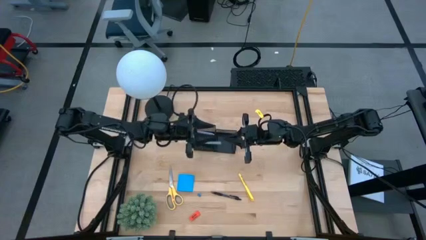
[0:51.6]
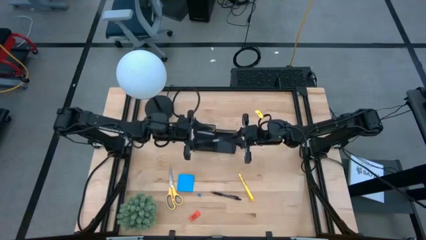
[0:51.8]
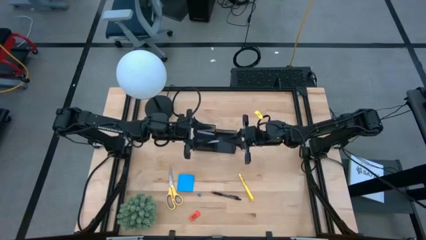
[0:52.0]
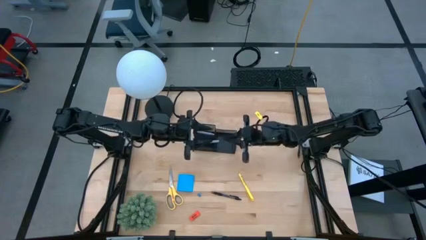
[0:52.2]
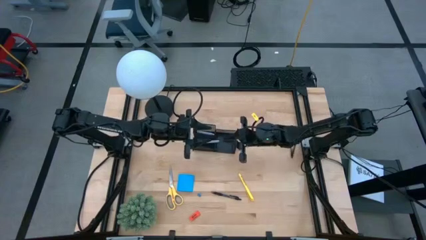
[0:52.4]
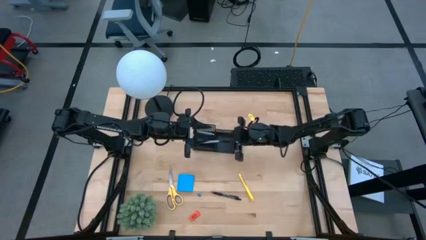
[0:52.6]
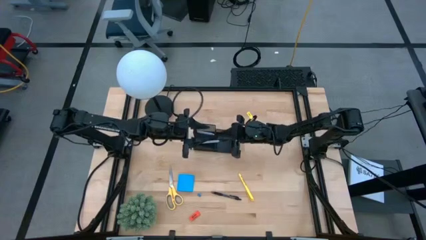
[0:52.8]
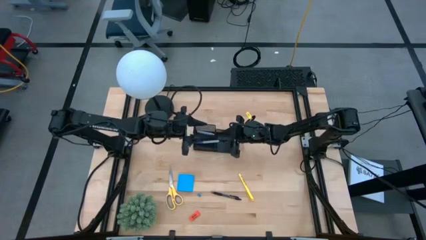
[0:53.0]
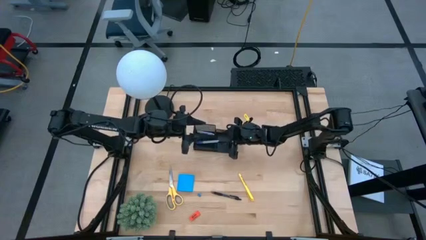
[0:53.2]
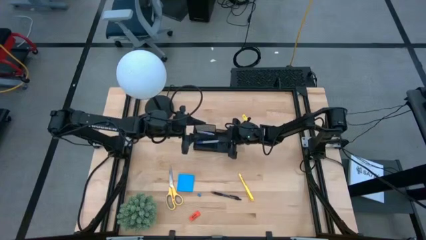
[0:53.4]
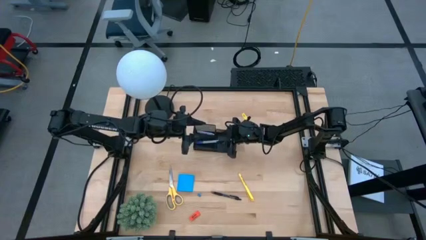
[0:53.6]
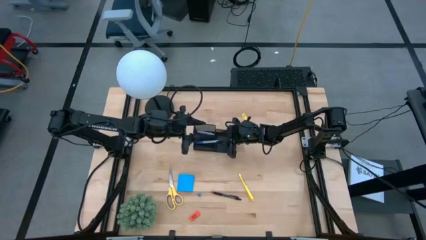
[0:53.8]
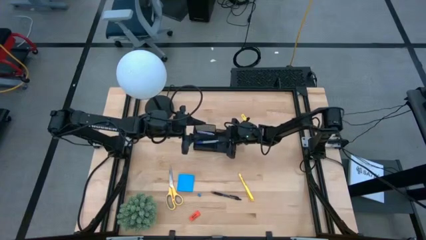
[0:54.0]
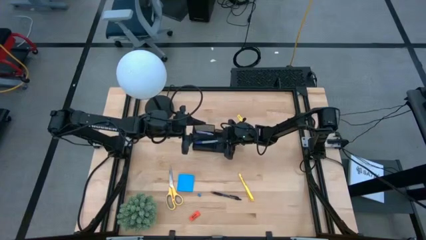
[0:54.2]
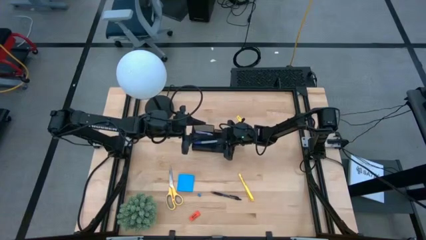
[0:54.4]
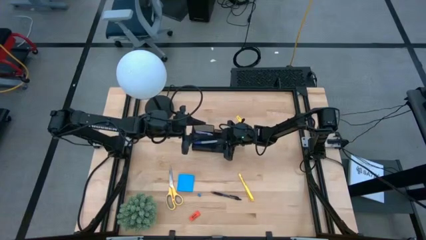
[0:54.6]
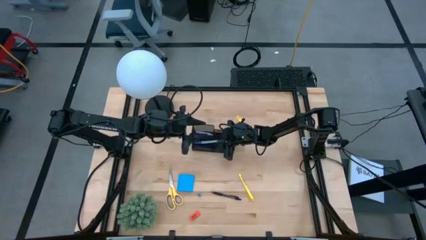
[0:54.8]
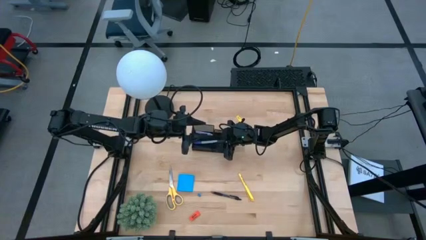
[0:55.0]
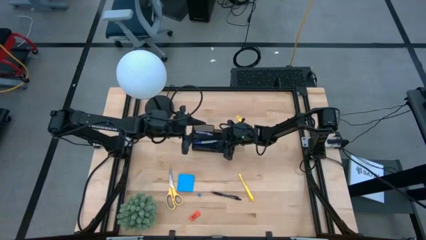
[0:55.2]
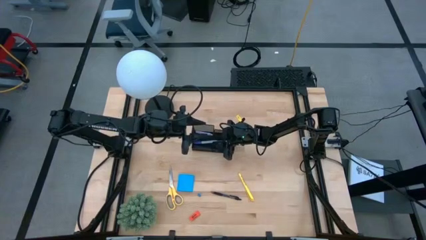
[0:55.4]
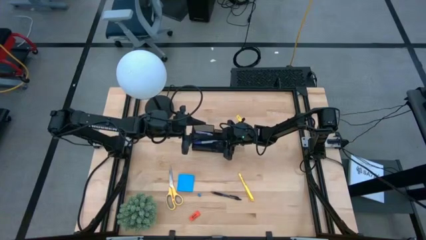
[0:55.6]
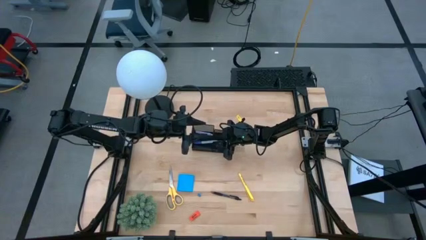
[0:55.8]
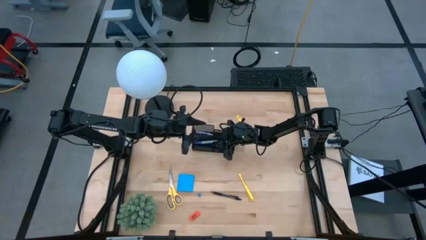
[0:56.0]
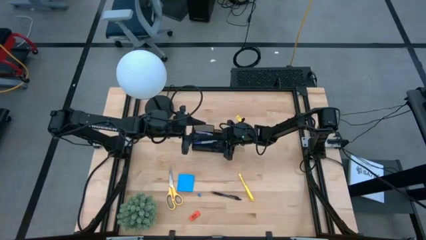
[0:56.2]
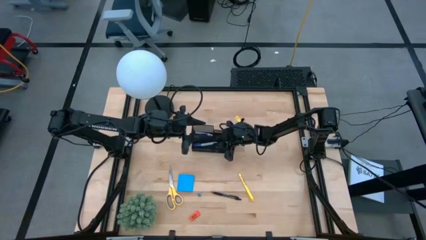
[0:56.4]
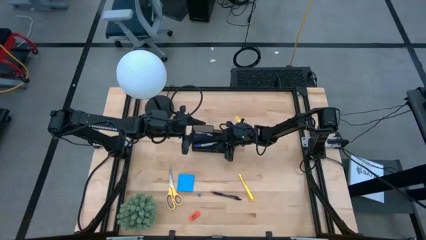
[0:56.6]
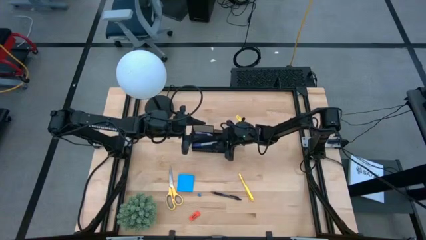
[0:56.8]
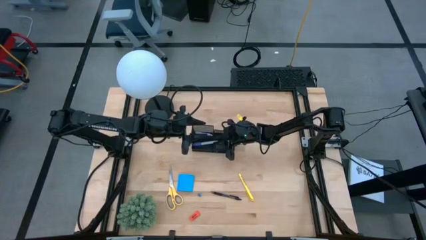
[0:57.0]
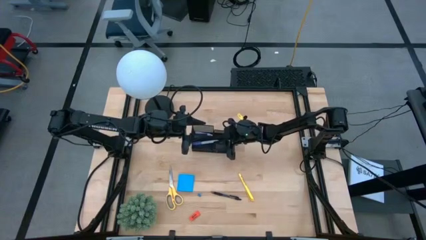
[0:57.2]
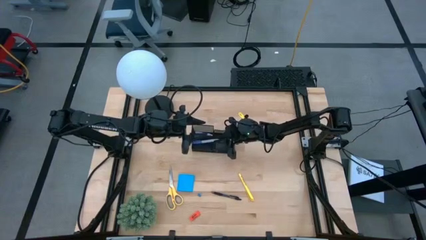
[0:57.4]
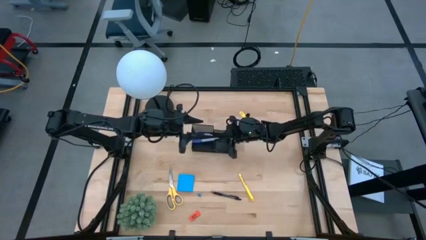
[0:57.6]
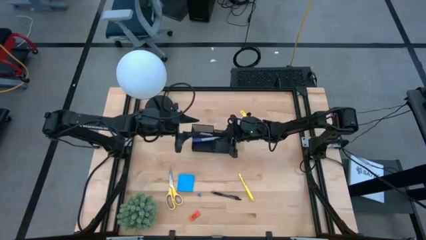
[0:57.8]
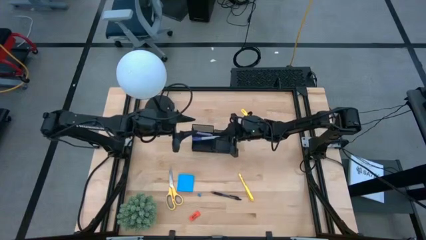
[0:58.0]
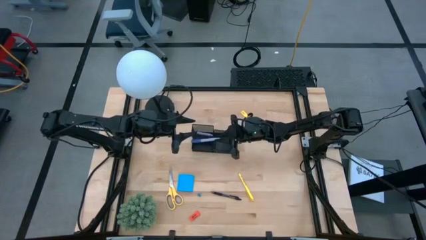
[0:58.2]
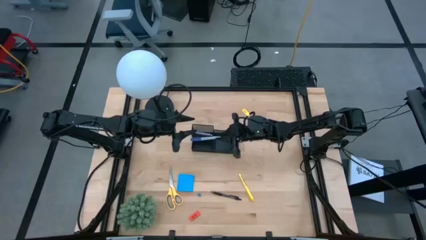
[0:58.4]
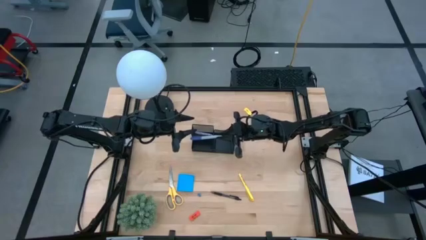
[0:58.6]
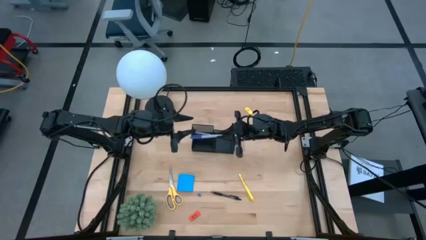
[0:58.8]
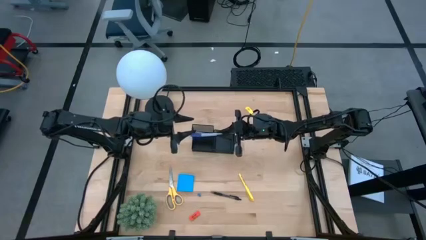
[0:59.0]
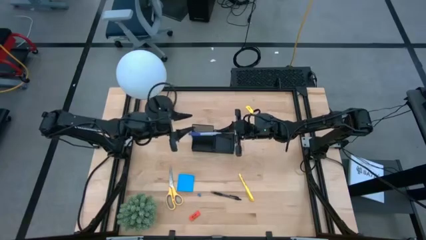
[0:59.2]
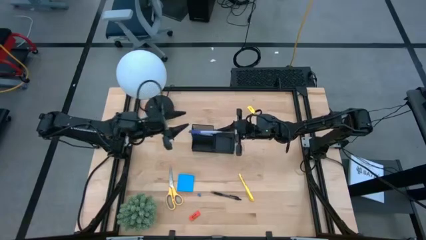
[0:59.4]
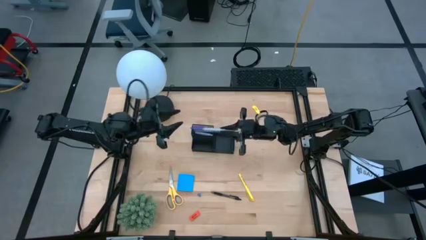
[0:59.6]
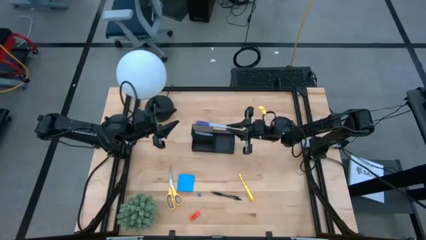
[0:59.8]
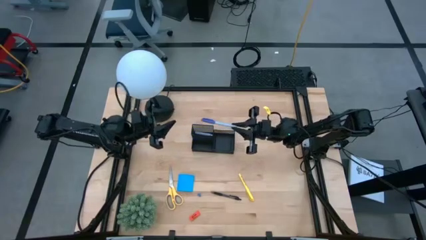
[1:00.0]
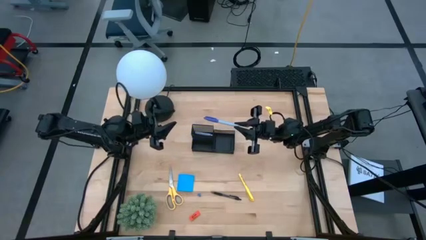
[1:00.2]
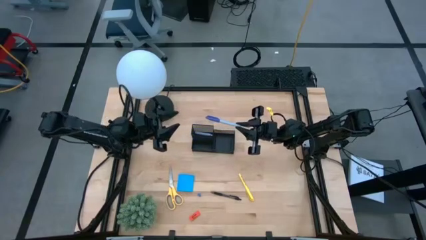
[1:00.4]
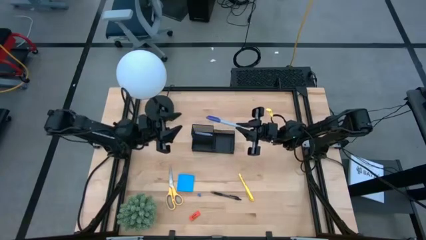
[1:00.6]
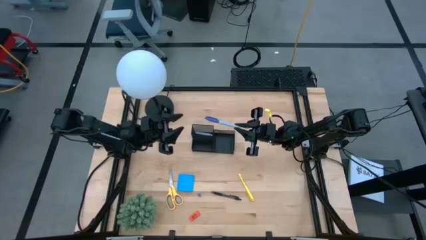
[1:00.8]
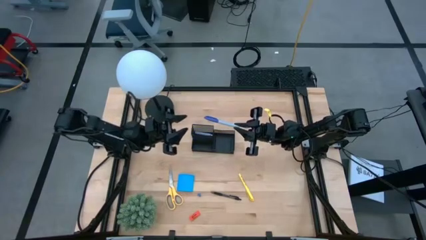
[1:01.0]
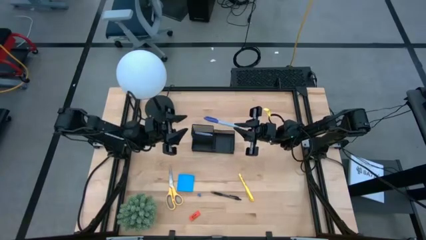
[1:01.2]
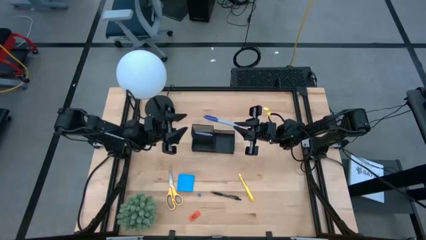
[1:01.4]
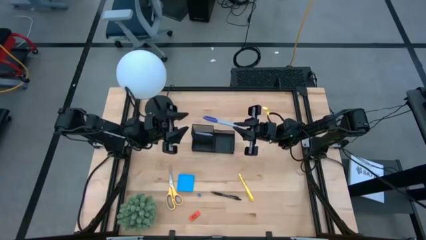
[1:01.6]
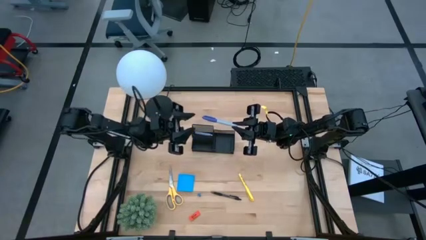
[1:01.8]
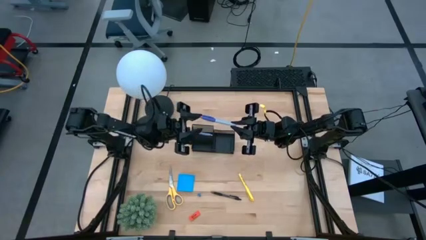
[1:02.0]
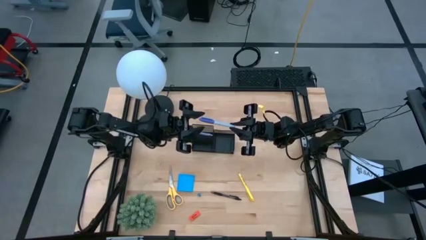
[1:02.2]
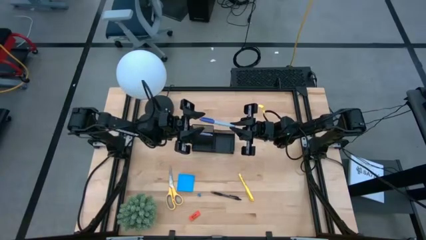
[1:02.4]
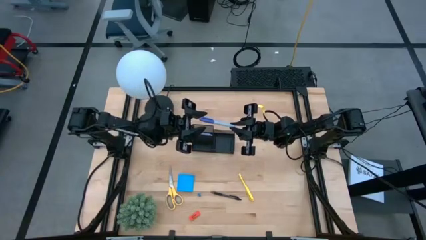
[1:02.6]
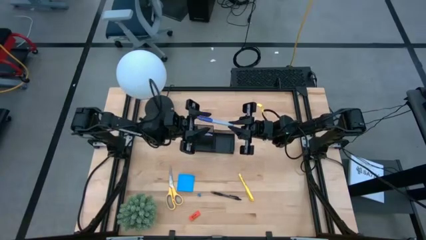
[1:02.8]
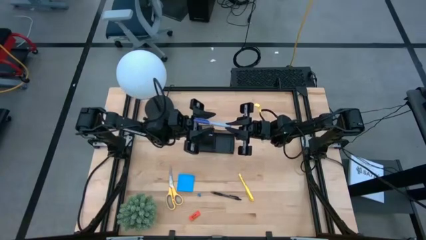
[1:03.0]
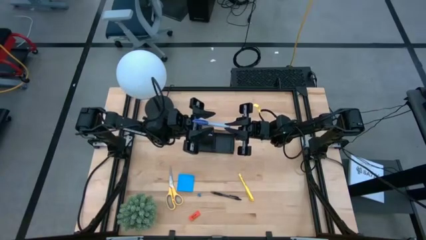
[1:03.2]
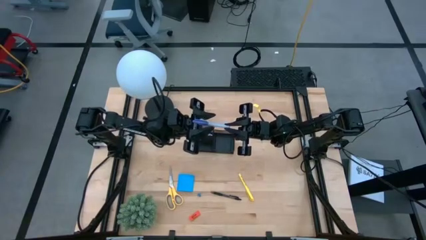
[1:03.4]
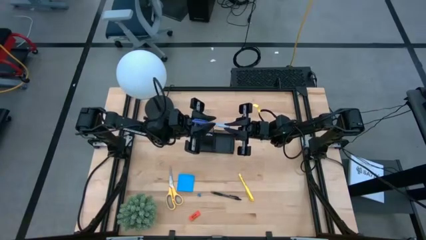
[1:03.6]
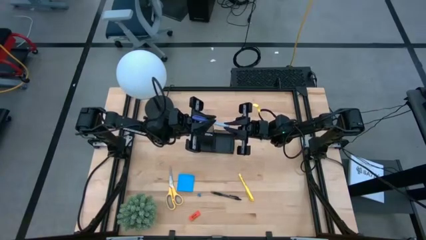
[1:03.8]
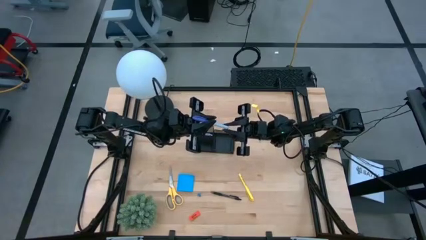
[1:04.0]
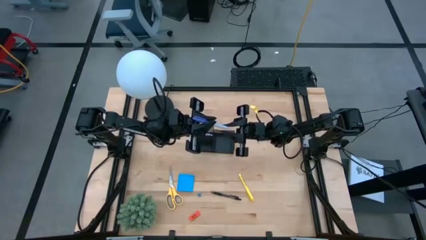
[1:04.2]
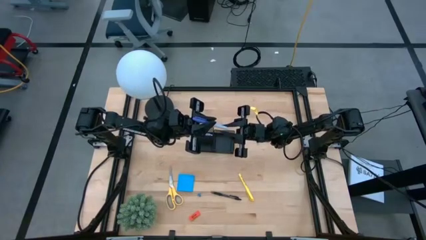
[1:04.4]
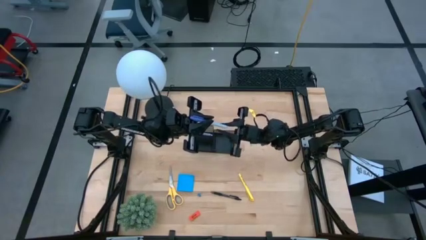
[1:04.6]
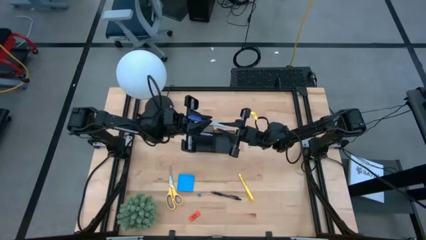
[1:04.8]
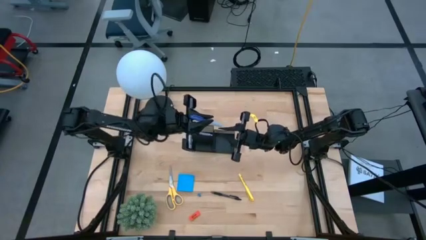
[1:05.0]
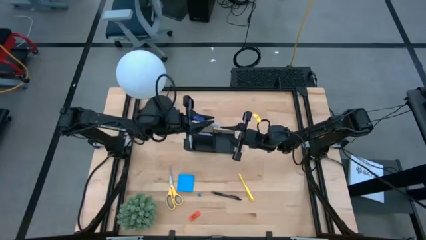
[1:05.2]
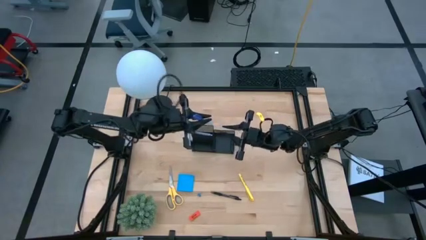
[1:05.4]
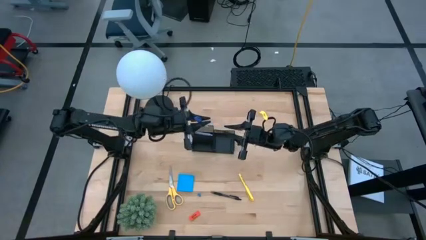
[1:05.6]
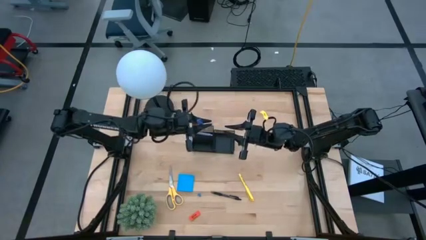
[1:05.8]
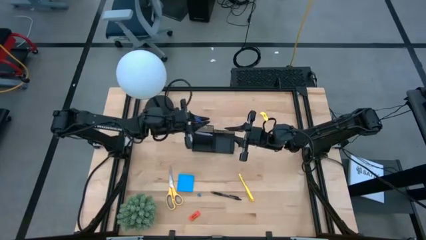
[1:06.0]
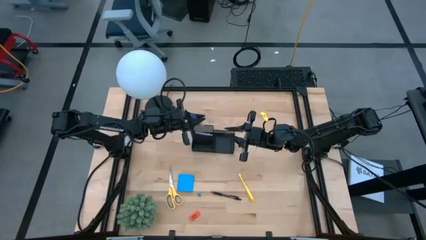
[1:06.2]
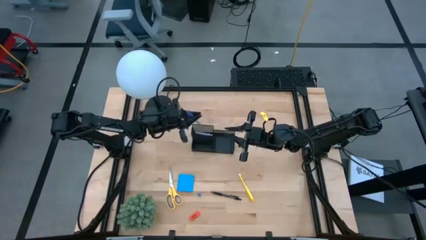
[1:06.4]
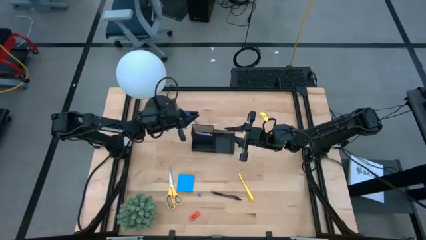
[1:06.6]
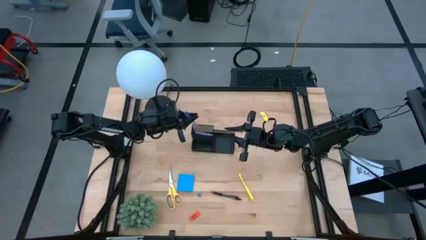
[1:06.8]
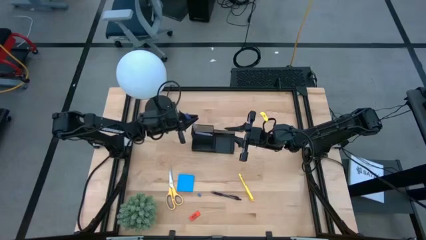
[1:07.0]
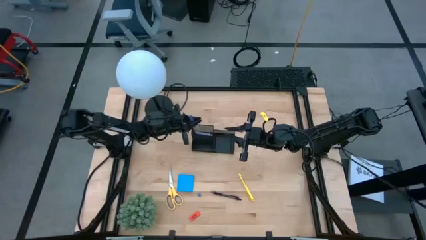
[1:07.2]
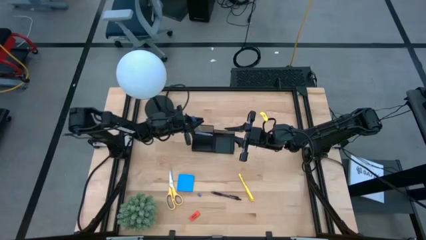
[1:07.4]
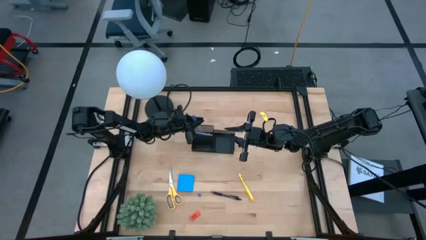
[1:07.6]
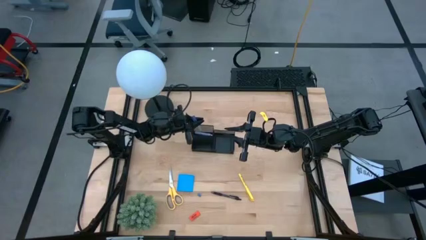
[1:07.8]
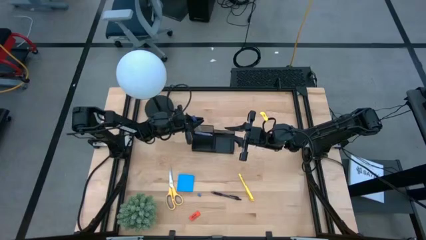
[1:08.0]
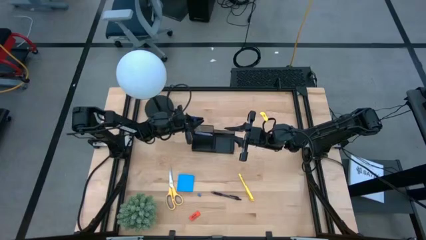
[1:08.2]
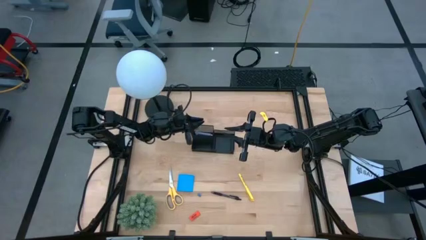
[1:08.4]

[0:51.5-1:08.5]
Task: Pick and place office supplies into organizer
Put the blue marker pen into the black desk organizer
